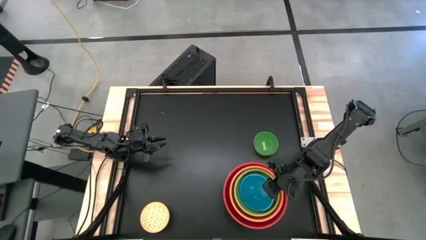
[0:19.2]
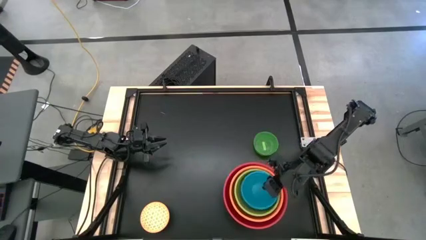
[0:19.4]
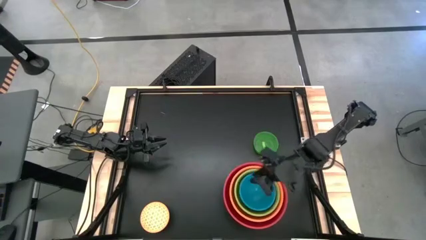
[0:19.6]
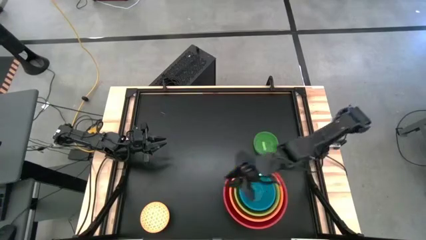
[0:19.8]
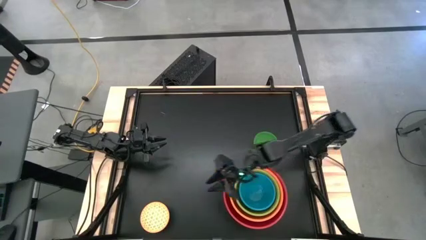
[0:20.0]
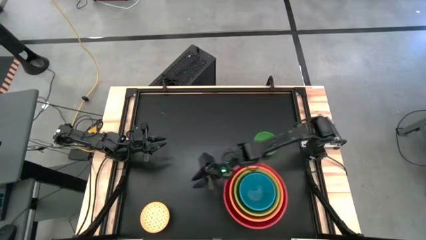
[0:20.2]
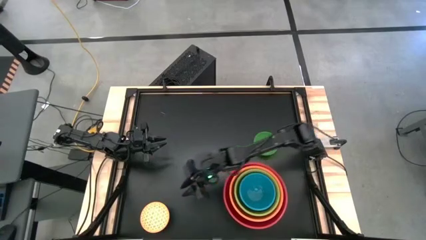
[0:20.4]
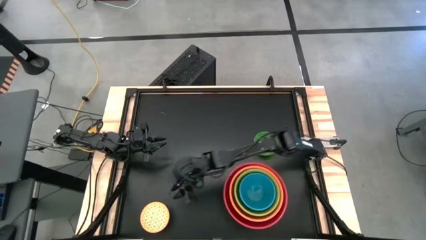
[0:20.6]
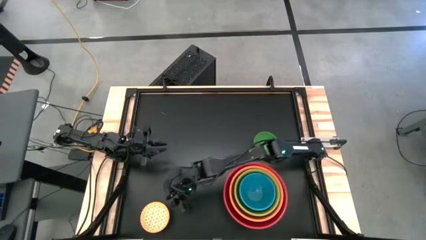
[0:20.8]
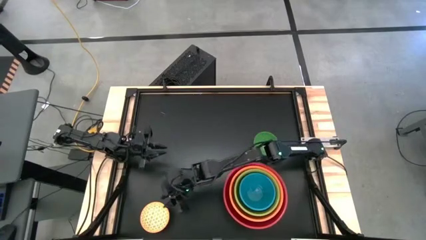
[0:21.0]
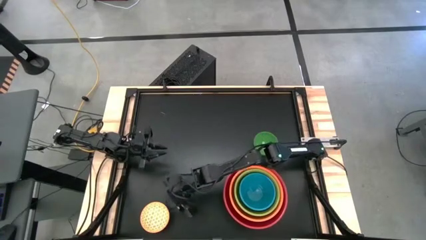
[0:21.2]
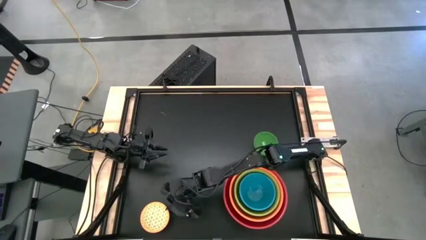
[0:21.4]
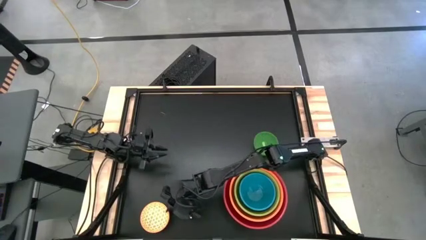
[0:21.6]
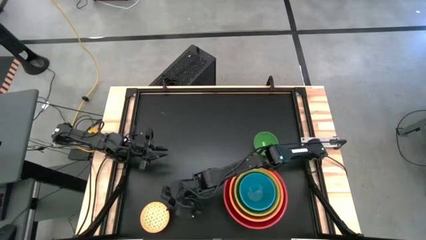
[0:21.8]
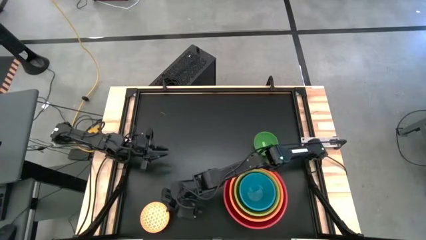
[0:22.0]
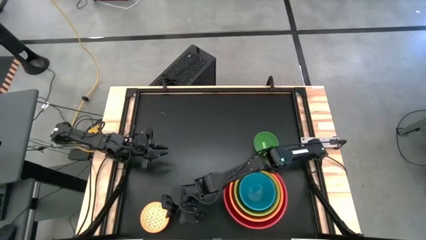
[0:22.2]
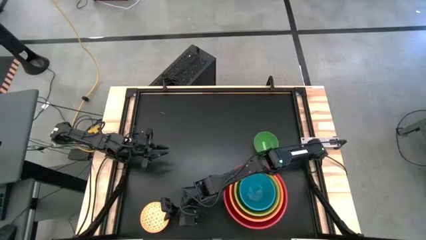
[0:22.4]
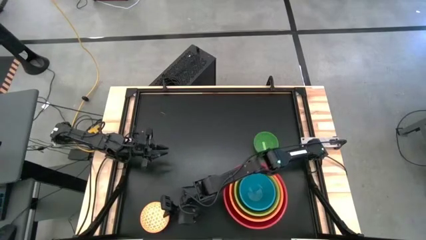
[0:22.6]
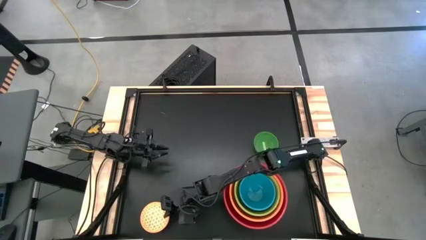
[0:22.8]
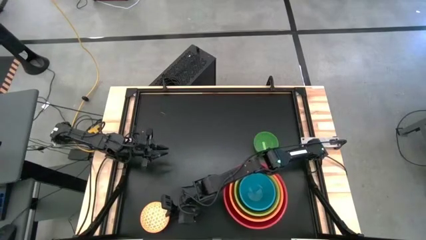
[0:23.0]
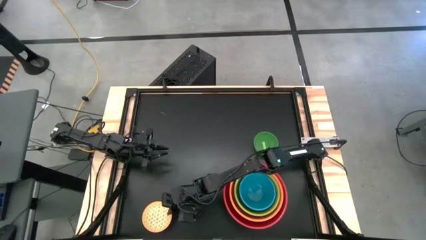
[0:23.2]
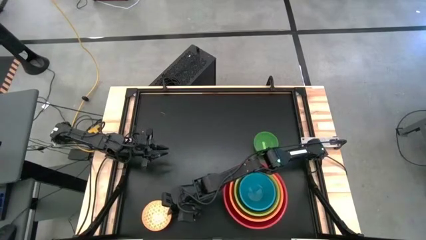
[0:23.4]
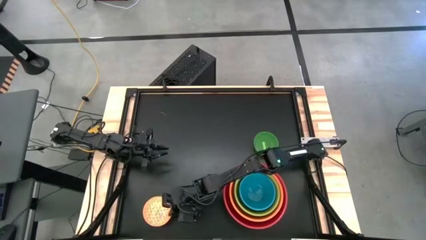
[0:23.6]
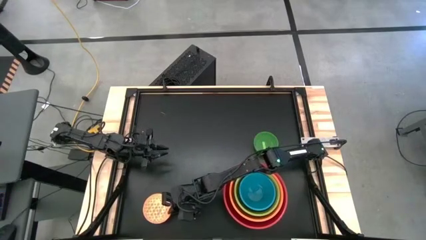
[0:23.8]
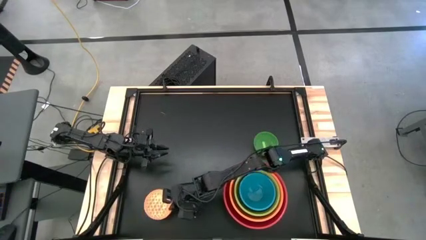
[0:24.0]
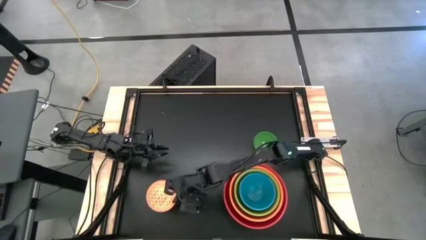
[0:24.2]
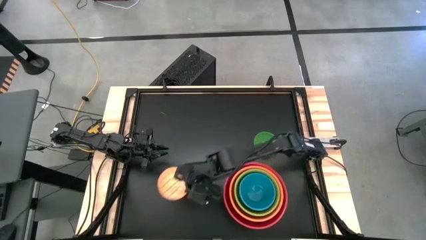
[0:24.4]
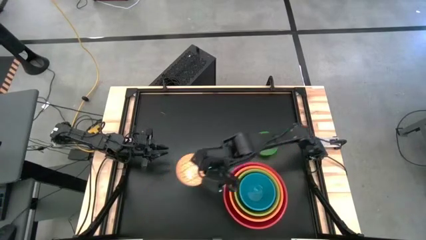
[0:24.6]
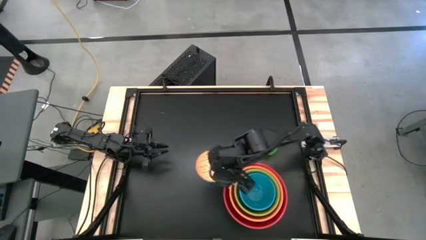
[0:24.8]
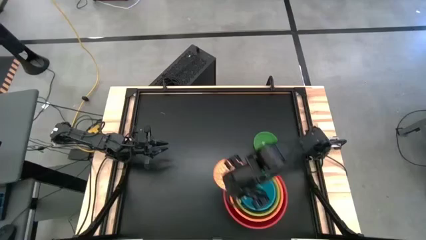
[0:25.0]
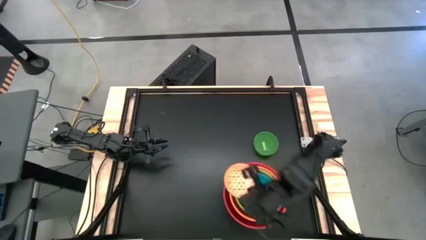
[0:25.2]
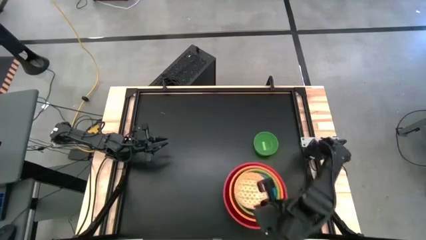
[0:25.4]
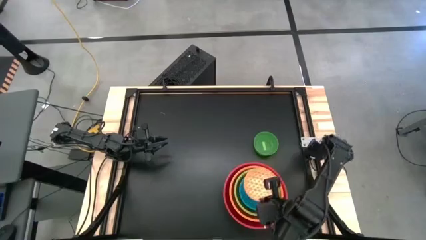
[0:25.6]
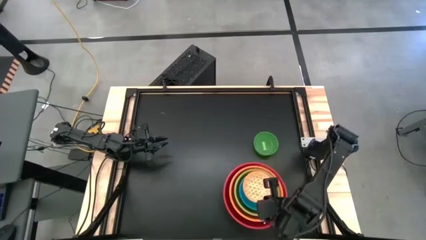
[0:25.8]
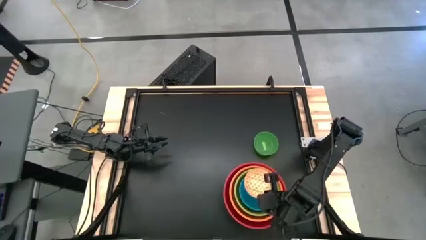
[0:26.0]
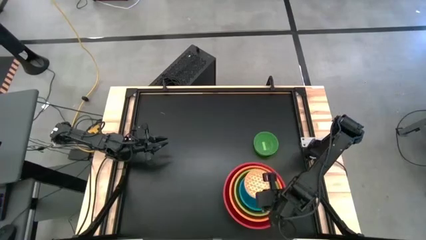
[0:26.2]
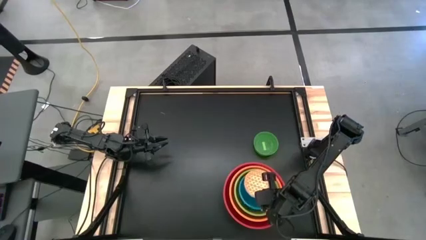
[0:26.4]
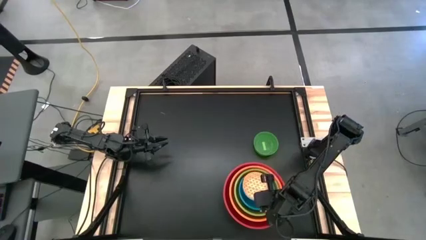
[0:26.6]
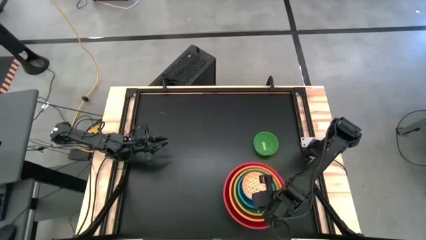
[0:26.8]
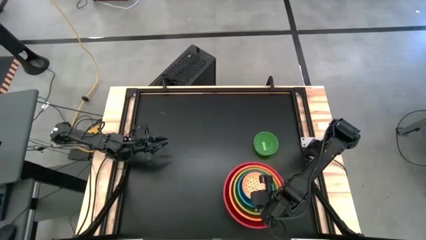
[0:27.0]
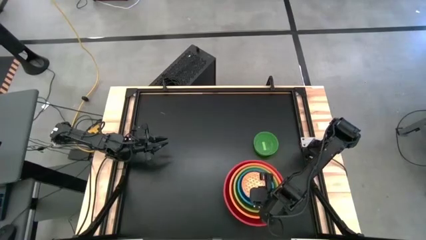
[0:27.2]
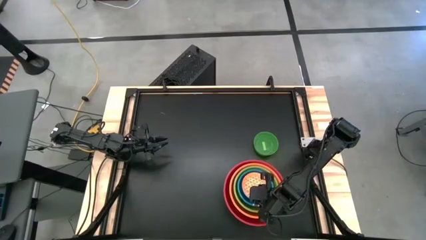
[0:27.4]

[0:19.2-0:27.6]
Stack the orange patterned bowl on top of the blue bowl

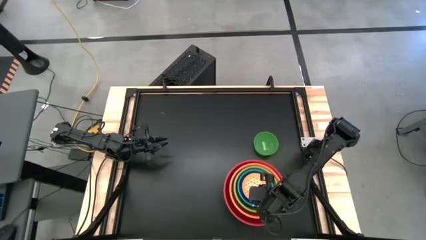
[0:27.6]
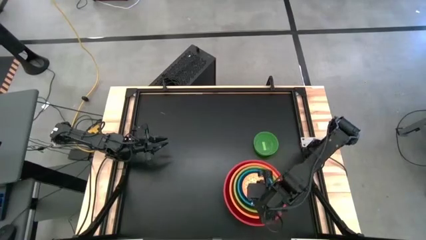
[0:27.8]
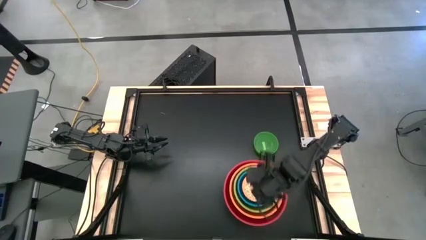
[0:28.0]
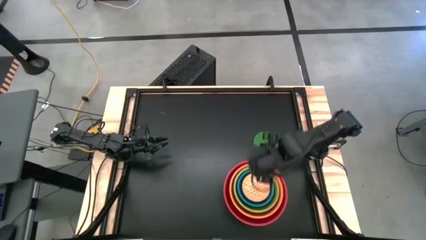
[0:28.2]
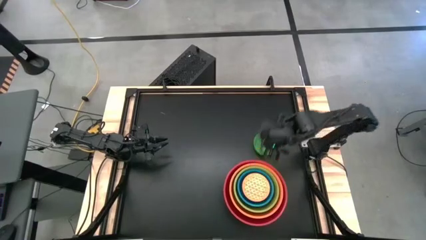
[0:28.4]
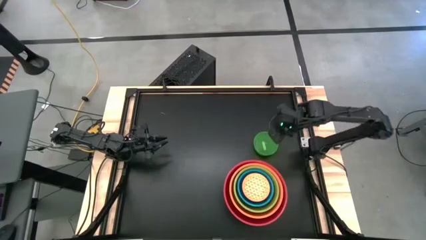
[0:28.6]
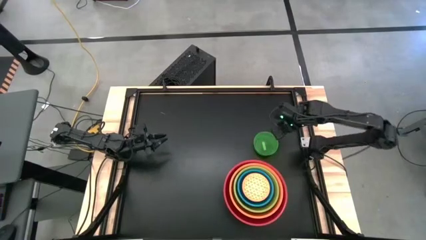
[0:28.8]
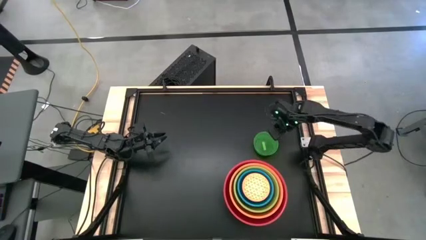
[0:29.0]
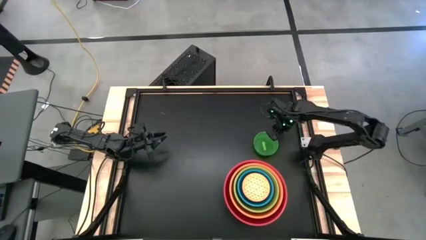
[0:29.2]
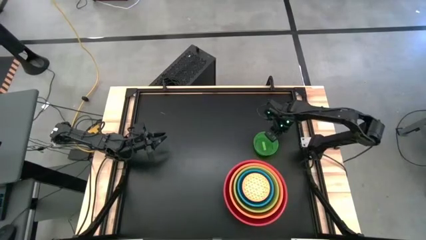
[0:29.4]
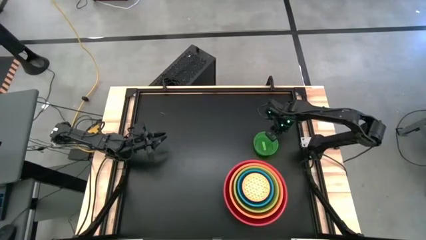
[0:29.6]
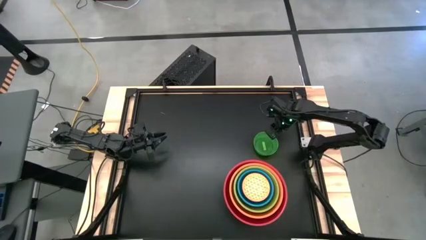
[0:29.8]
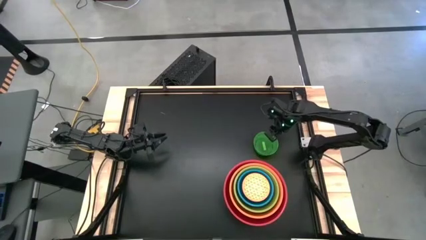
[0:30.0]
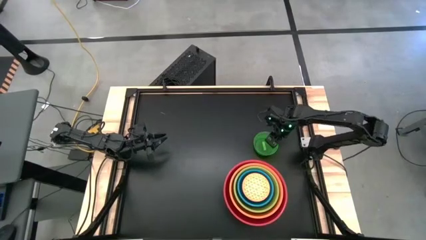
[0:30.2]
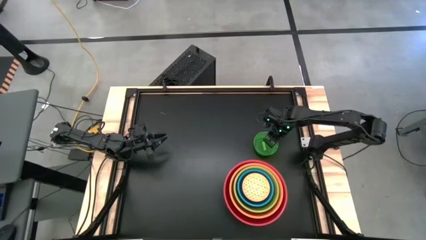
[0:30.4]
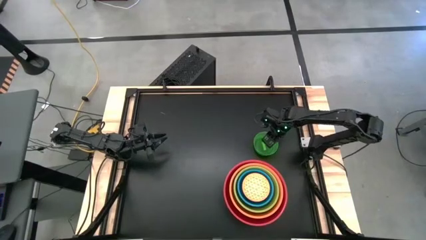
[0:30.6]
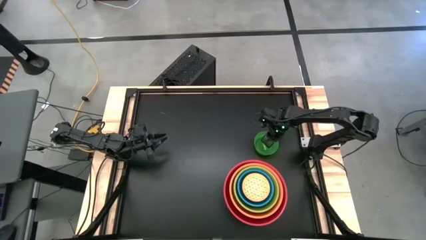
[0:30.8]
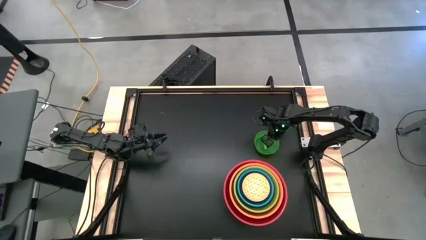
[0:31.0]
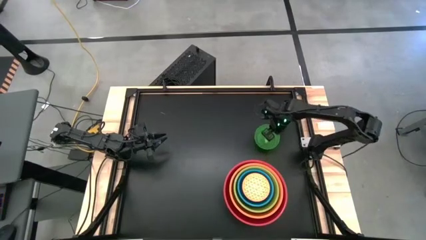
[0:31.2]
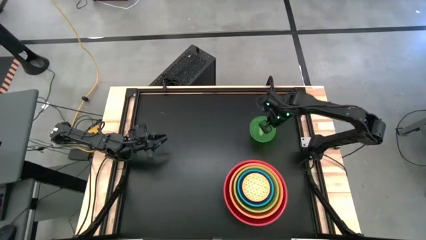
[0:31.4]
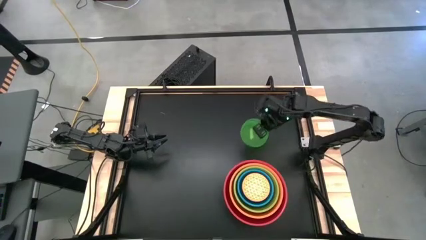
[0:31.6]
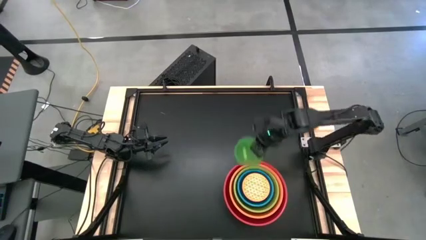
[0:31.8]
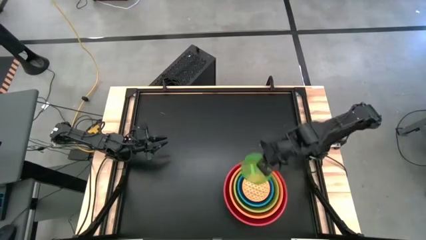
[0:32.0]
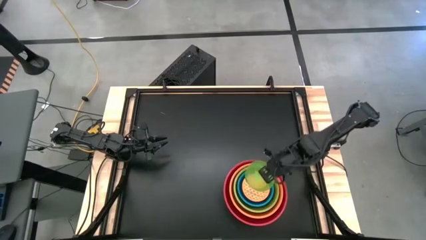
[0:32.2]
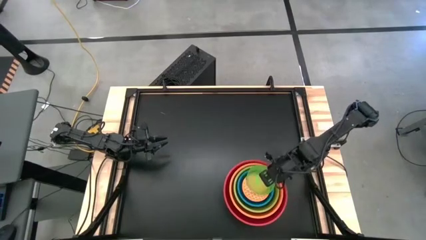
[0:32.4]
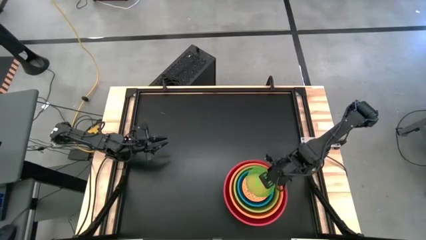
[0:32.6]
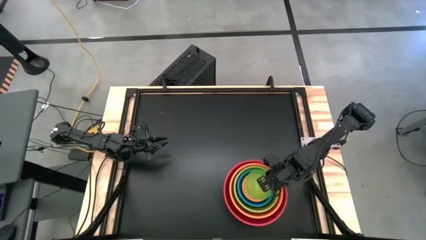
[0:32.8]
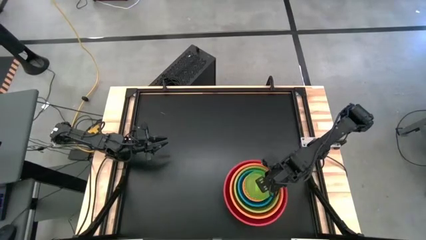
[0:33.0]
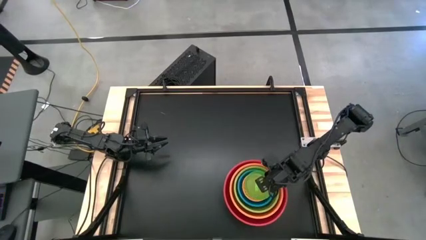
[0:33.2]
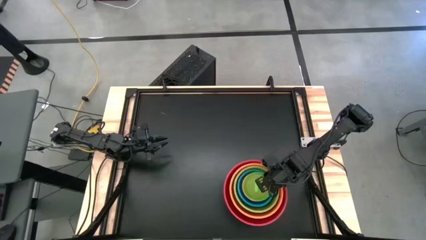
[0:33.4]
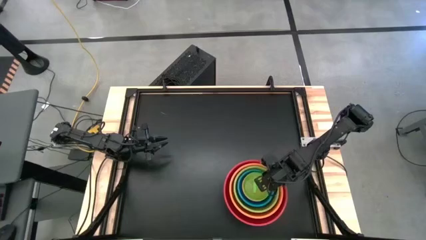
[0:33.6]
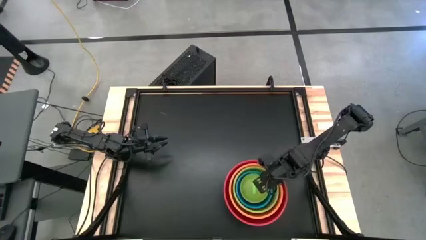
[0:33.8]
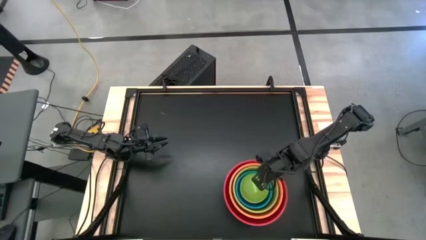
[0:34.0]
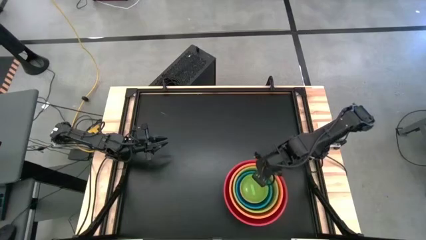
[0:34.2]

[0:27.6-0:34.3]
Stack the green bowl on top of the orange patterned bowl

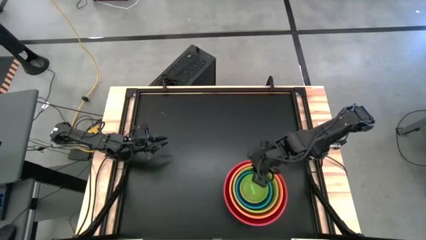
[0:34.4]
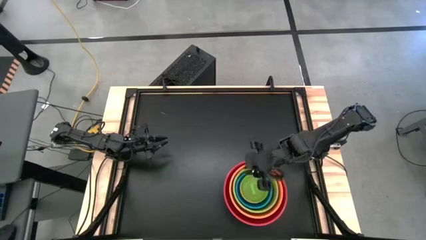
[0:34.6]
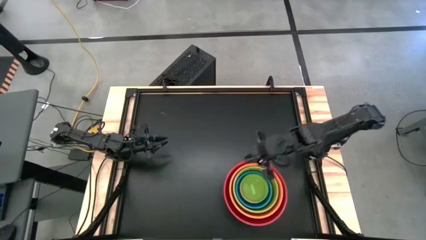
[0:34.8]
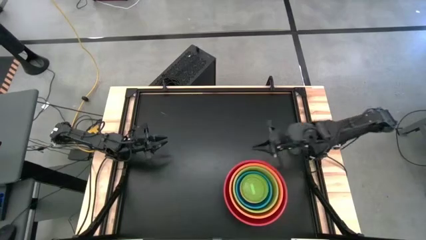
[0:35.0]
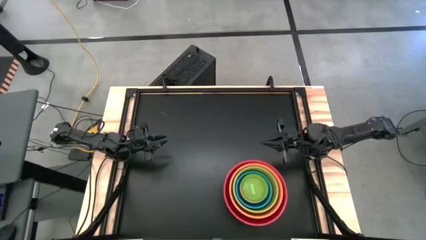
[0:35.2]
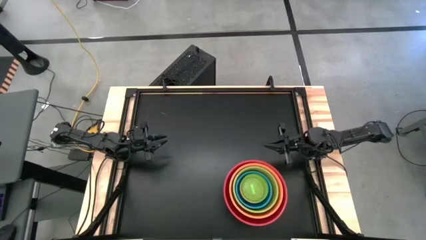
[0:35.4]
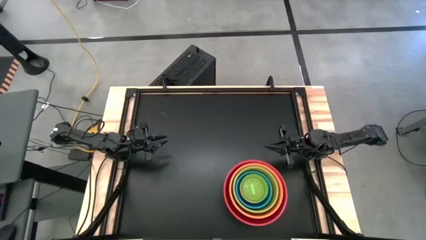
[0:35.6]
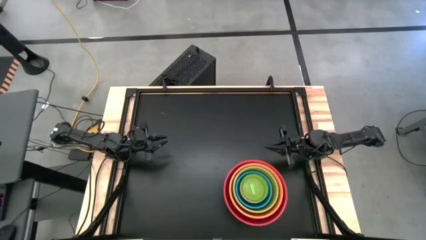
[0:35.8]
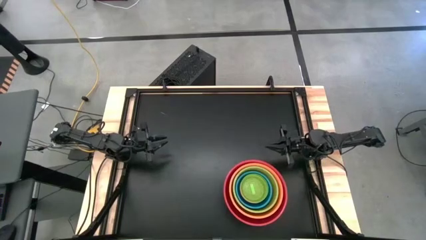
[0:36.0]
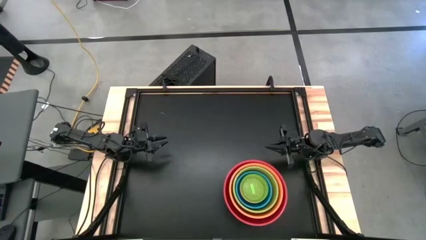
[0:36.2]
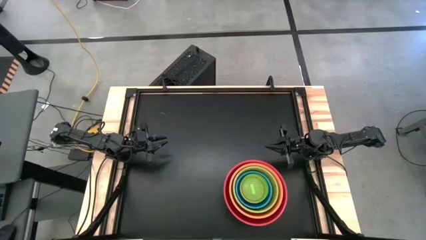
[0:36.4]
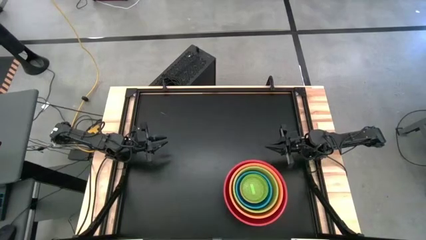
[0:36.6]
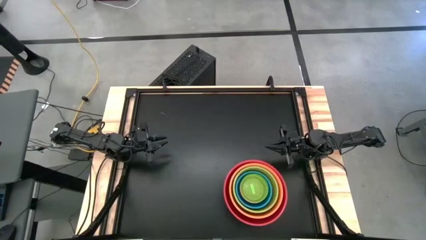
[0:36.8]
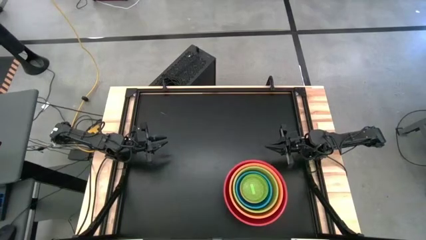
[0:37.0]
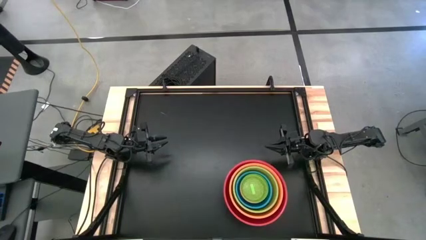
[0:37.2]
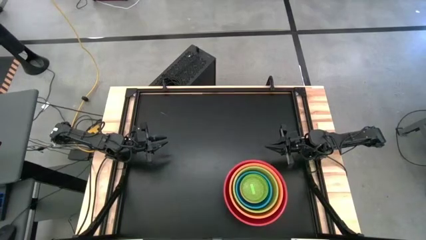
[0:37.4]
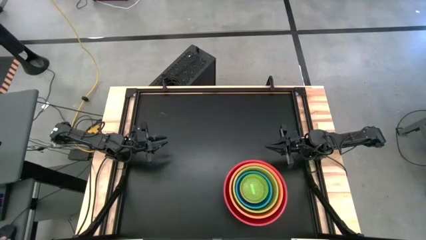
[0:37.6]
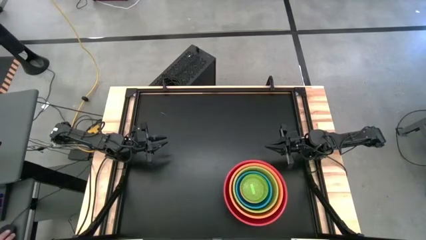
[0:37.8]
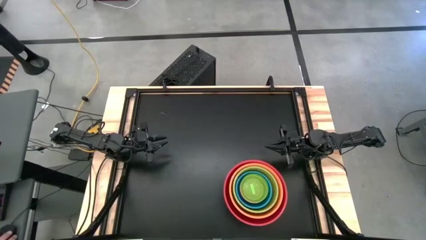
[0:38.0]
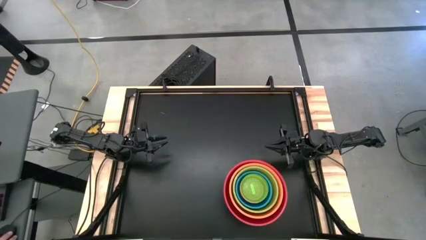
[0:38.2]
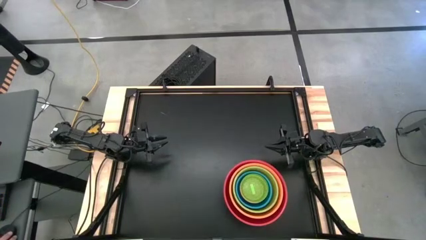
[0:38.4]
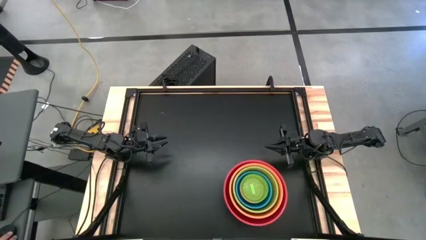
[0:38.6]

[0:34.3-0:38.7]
Return to Home Position
